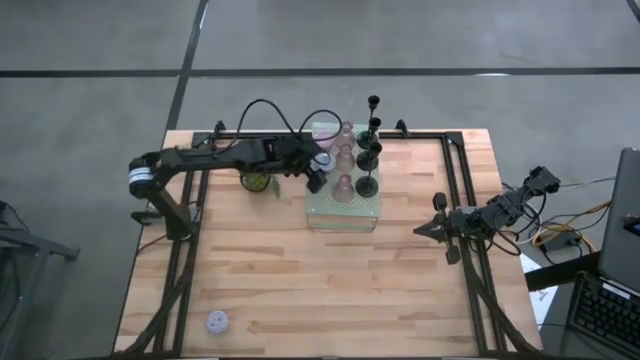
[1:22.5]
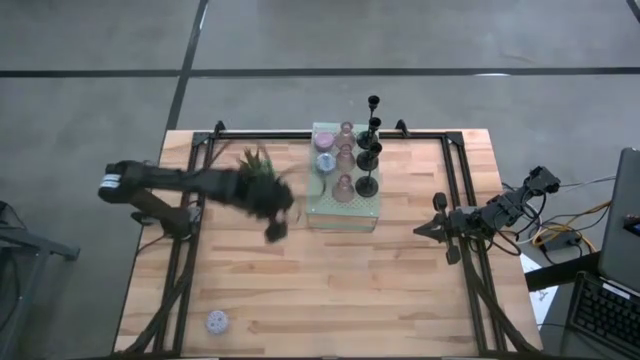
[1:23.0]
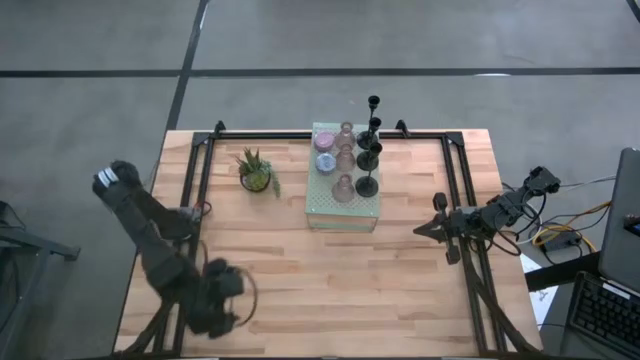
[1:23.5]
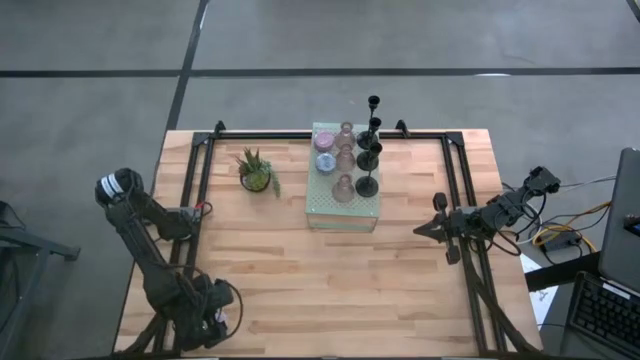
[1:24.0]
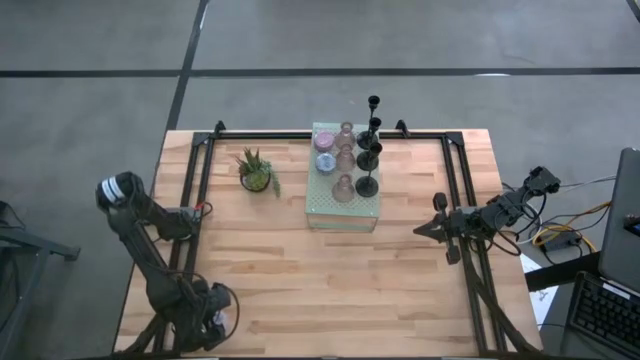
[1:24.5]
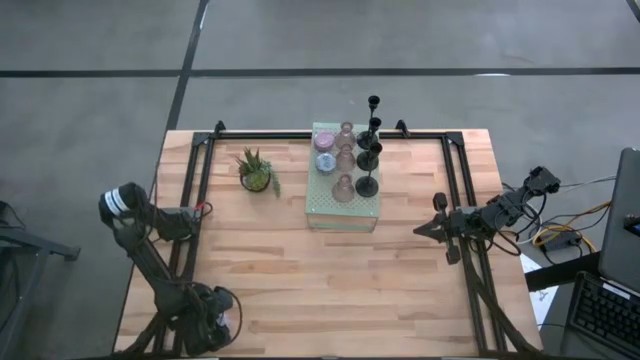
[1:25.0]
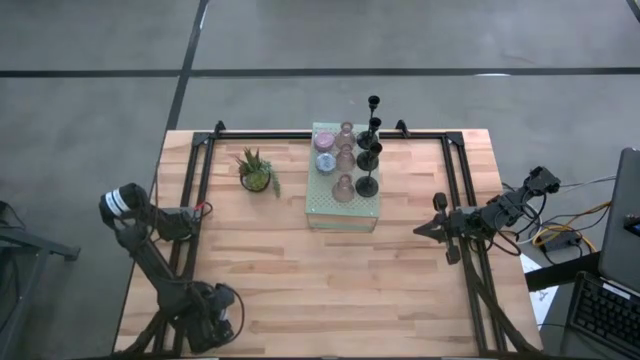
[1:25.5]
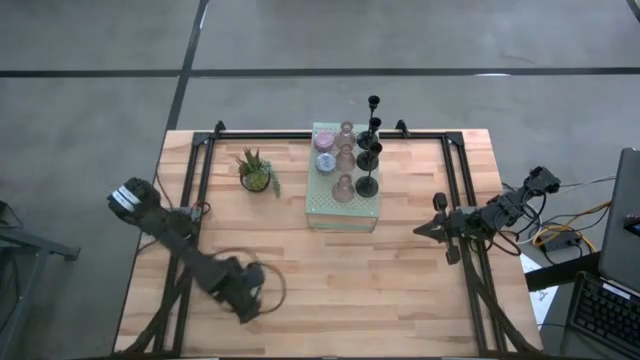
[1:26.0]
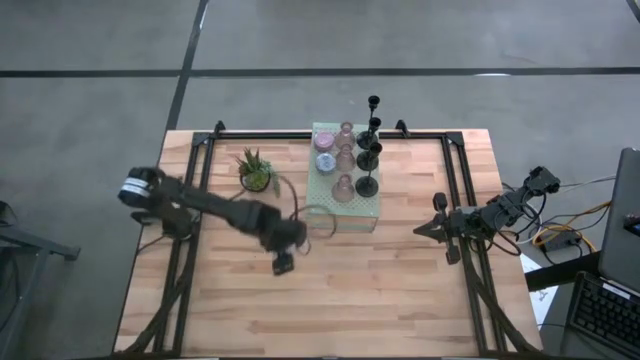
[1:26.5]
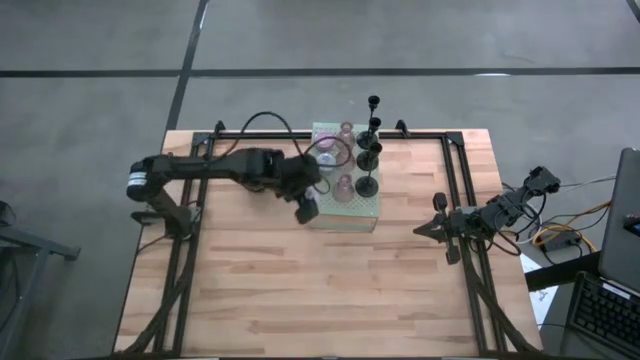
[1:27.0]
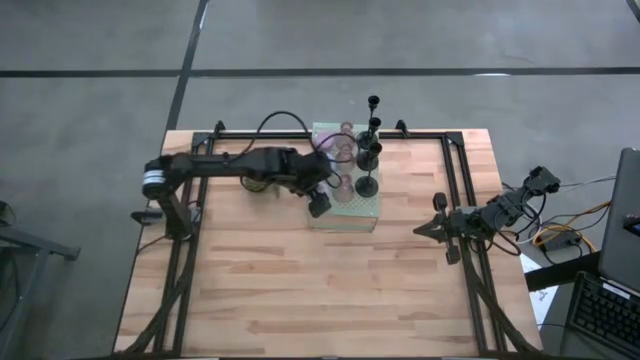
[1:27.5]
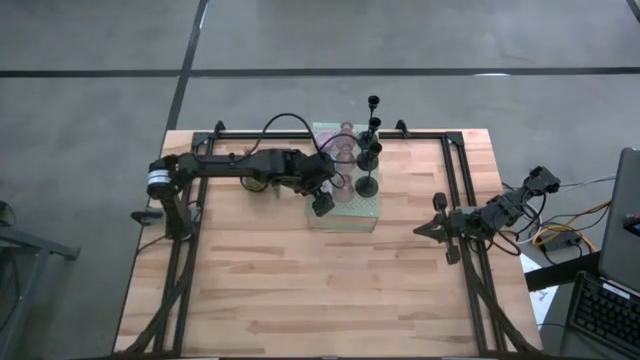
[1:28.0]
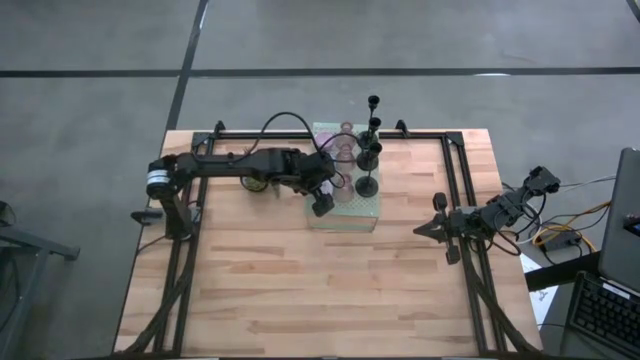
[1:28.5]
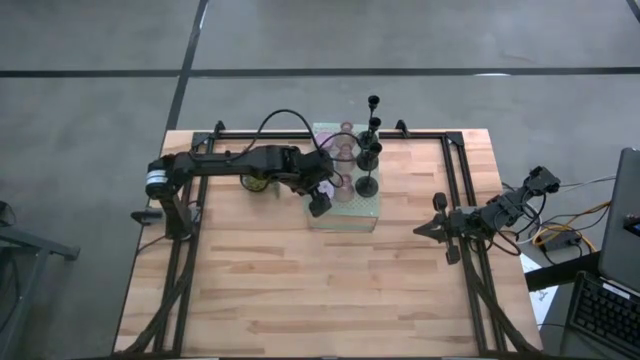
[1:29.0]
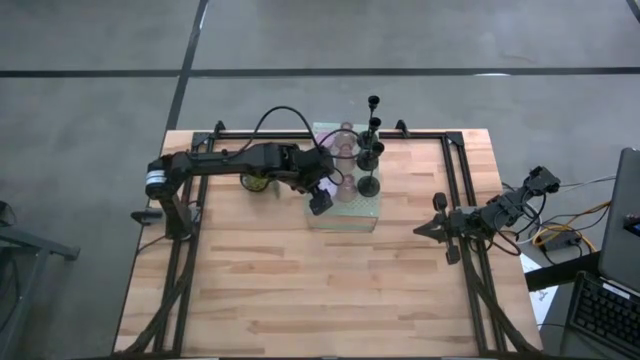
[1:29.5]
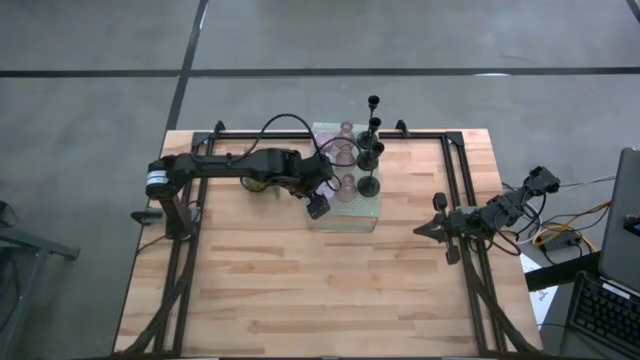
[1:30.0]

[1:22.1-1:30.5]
Task: Pick & Place candle stick holders
Put the red scented candle on the shelf

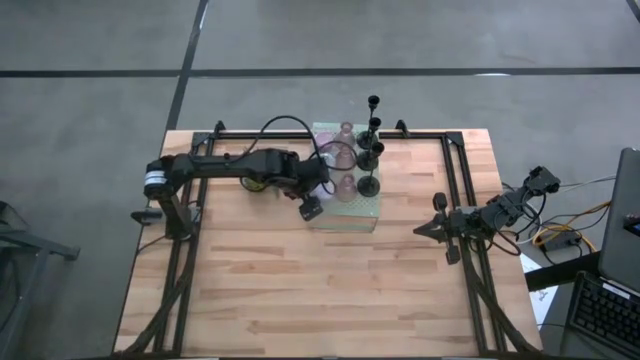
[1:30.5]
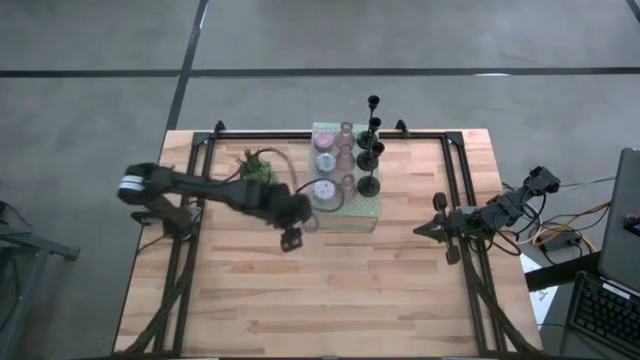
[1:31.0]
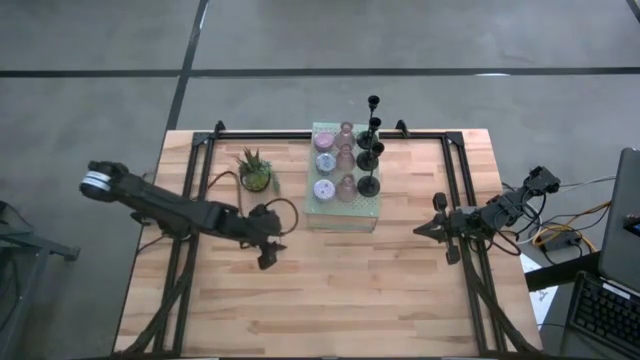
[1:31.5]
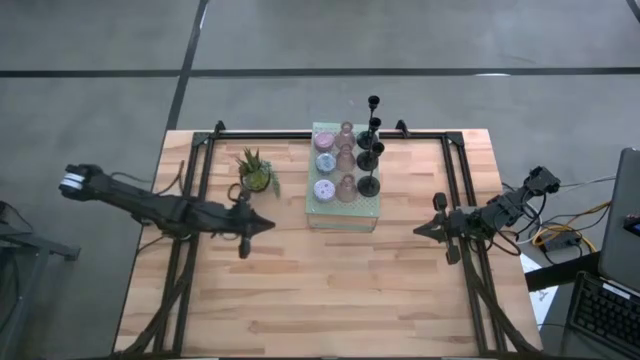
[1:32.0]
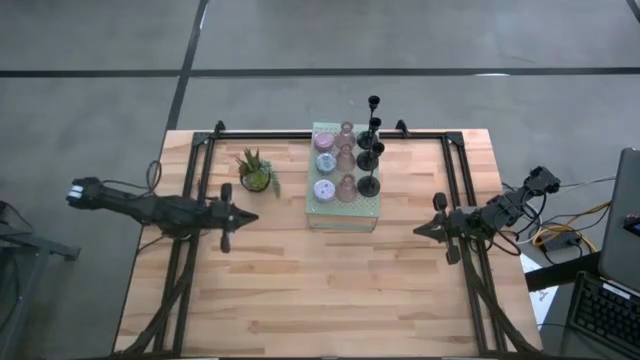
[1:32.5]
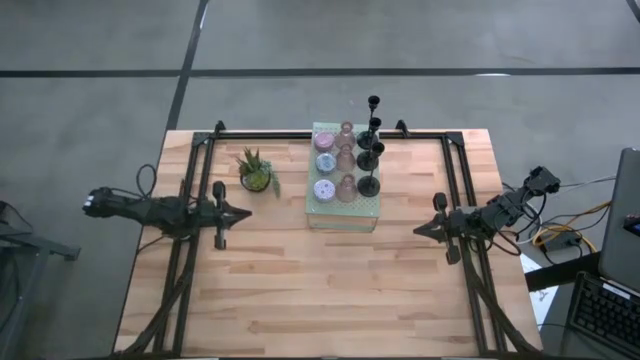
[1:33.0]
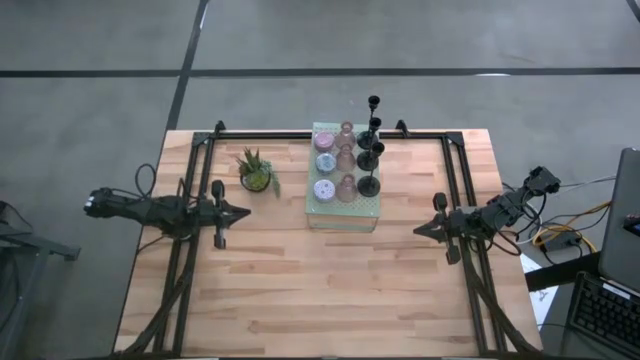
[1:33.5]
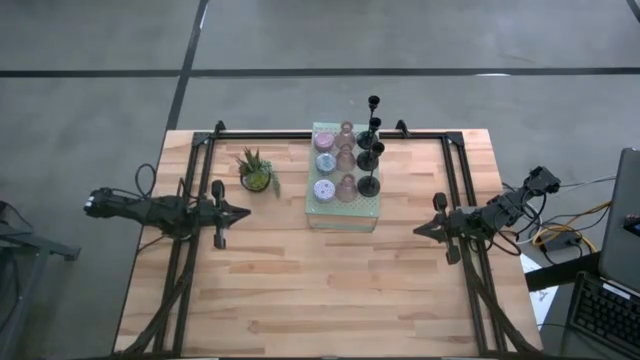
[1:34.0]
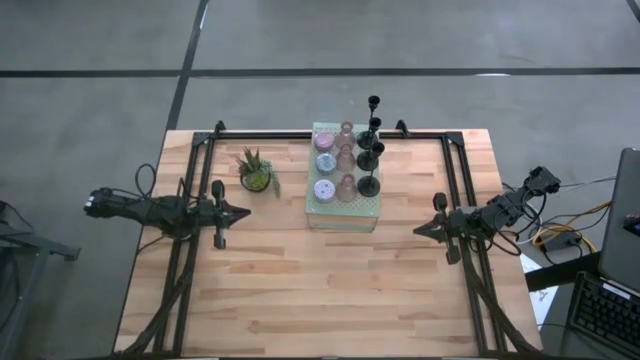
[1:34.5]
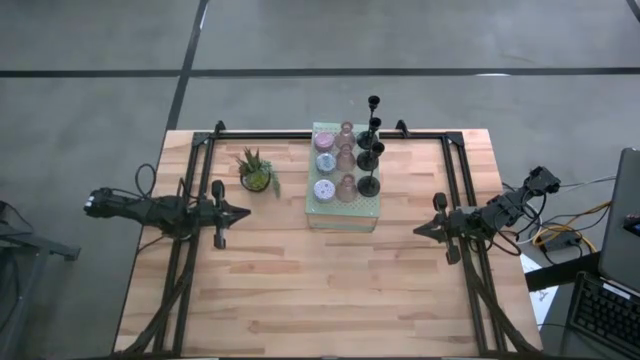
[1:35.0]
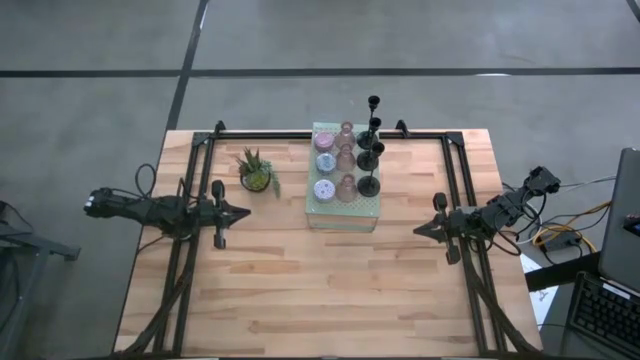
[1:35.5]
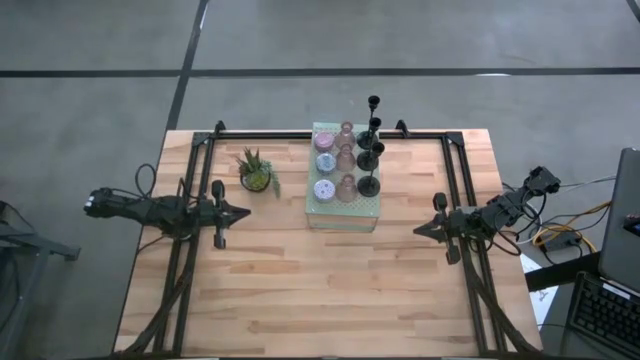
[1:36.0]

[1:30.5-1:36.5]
Return to Home Position

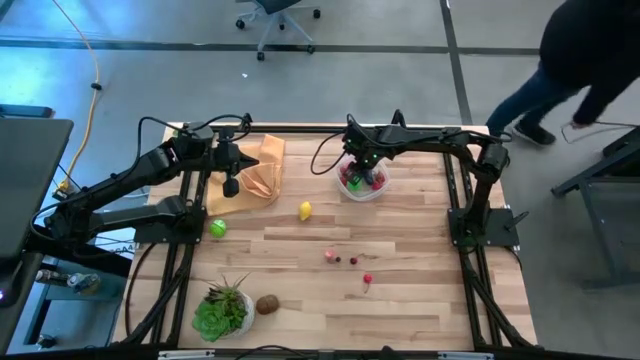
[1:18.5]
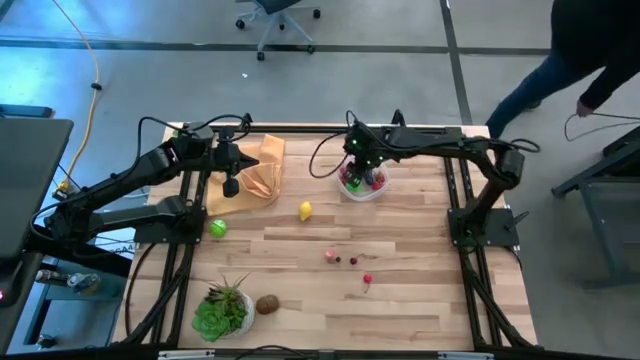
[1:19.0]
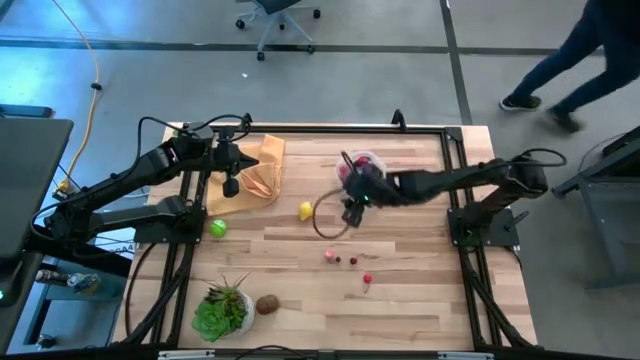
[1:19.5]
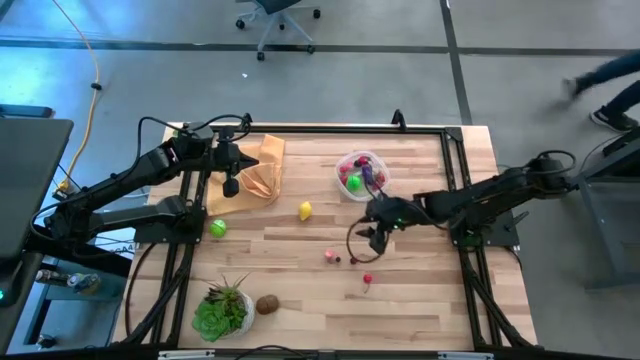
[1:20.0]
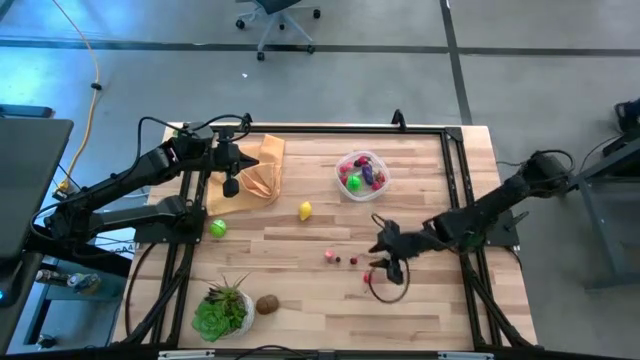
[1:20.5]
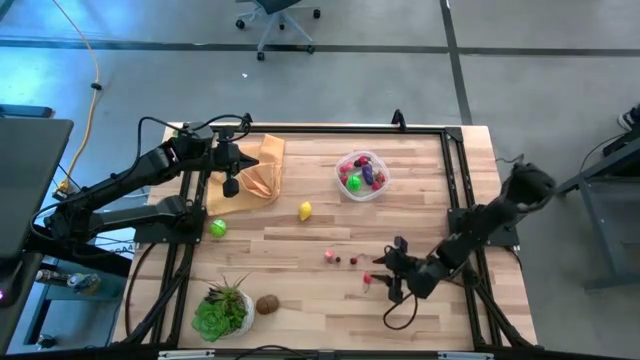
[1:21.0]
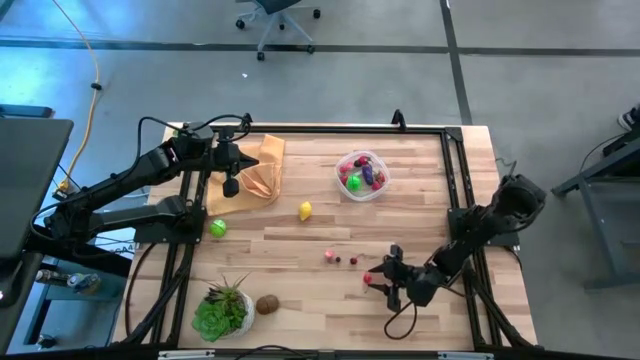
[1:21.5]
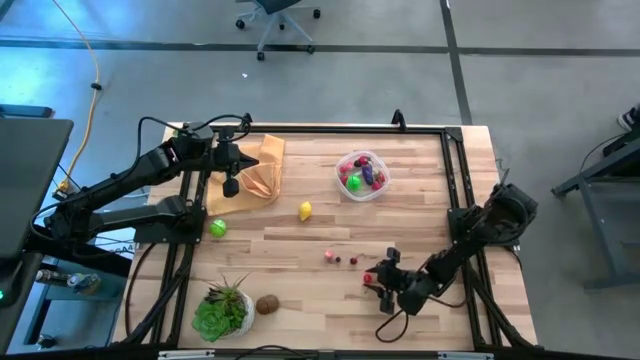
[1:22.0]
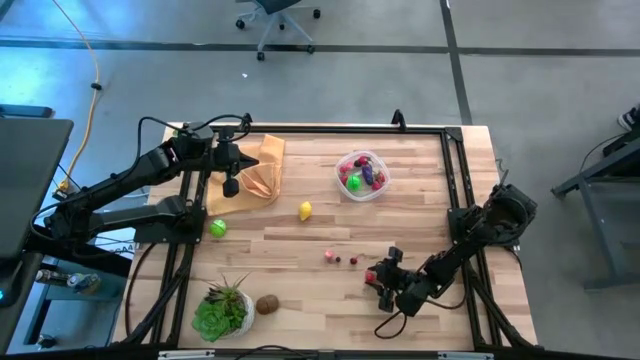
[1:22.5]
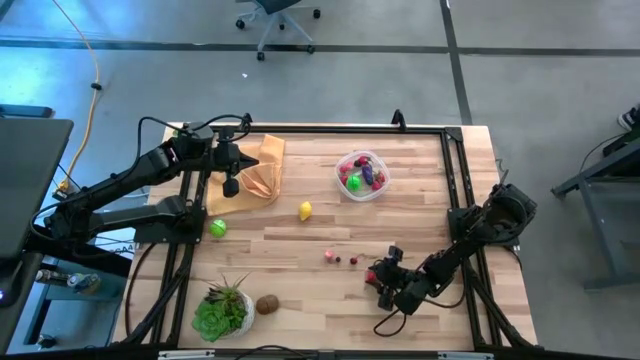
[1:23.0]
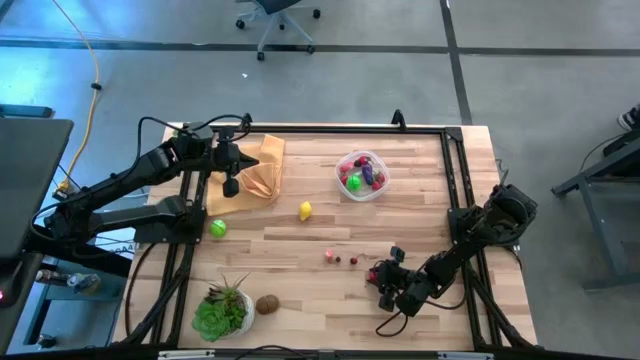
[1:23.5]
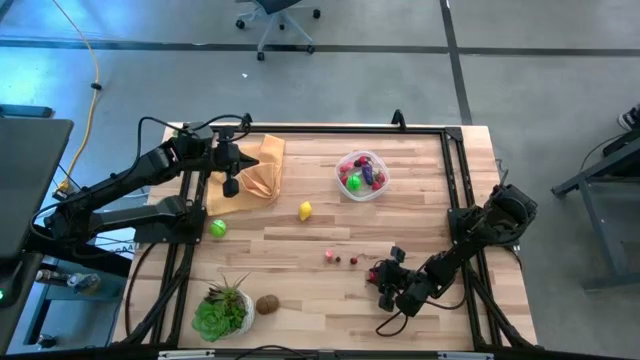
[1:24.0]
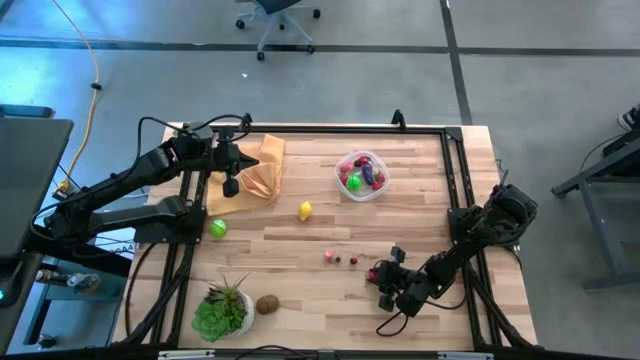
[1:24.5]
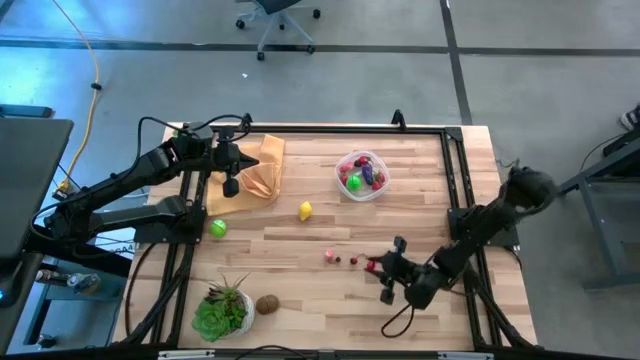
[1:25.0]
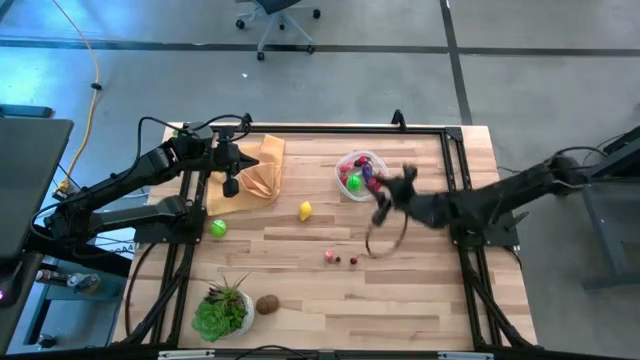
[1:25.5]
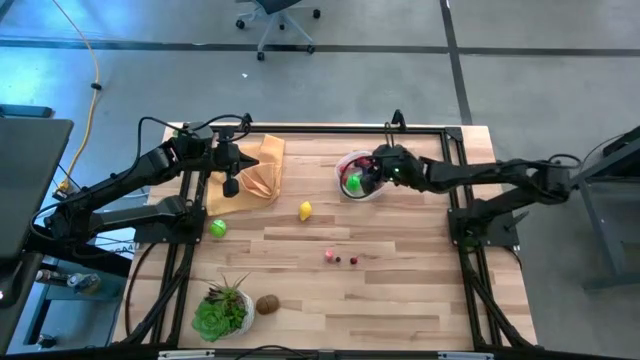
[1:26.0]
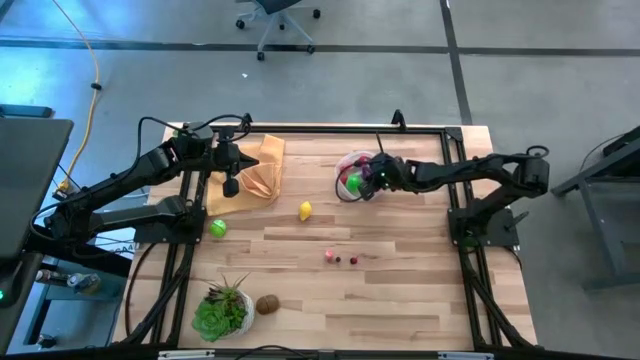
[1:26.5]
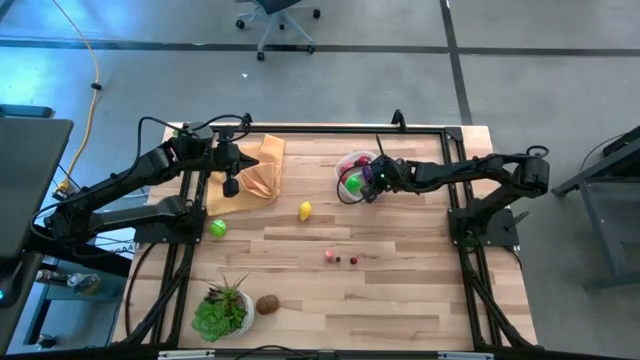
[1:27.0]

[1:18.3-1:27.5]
Task: Pick and placing Produce into tupperware
Put the red cherry into the transparent container
